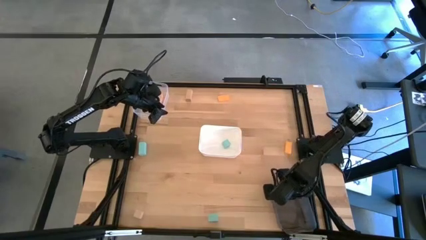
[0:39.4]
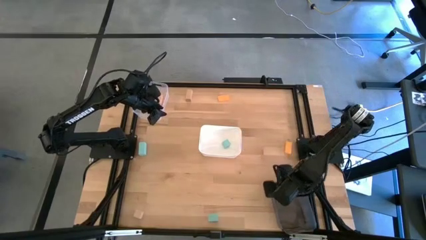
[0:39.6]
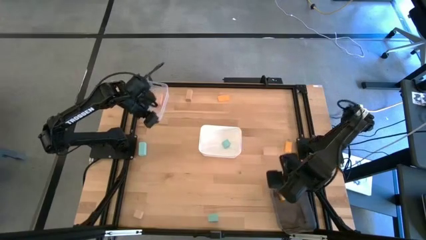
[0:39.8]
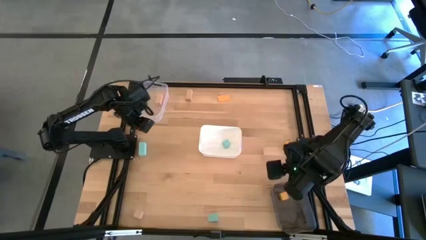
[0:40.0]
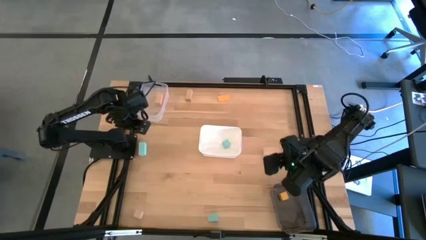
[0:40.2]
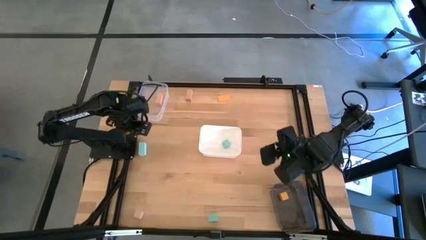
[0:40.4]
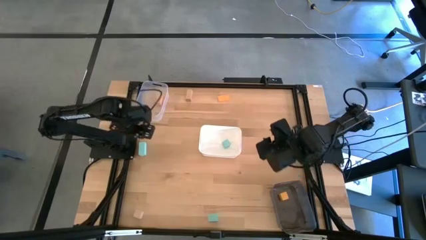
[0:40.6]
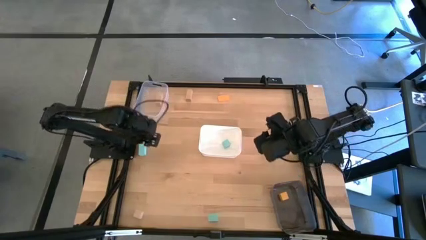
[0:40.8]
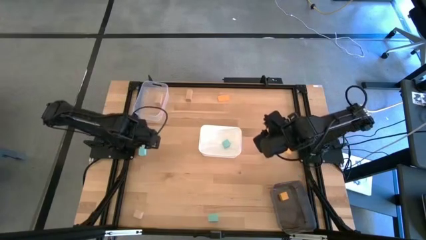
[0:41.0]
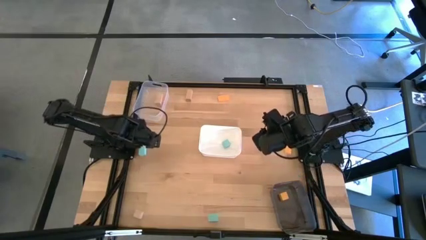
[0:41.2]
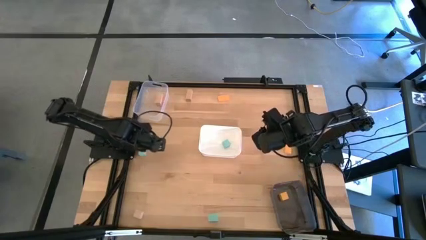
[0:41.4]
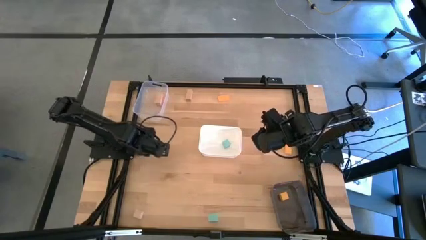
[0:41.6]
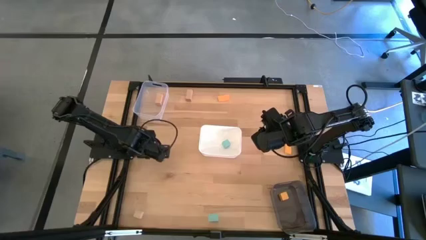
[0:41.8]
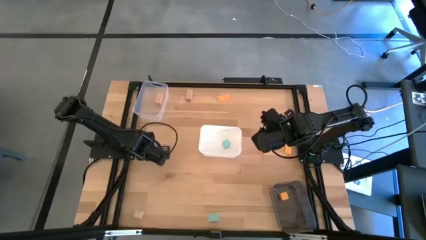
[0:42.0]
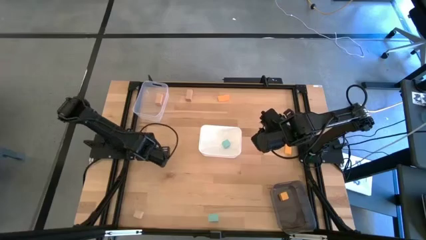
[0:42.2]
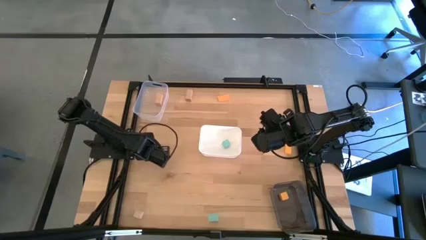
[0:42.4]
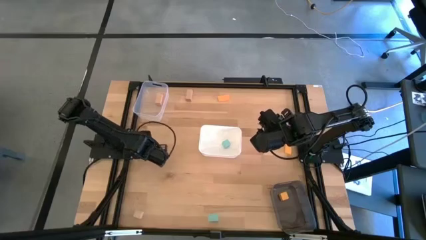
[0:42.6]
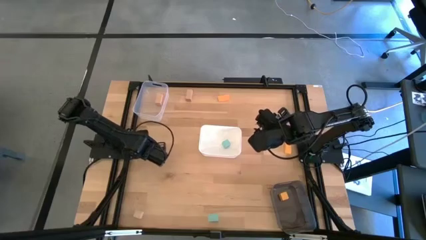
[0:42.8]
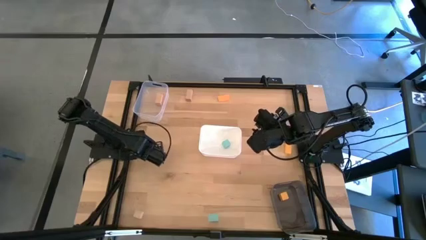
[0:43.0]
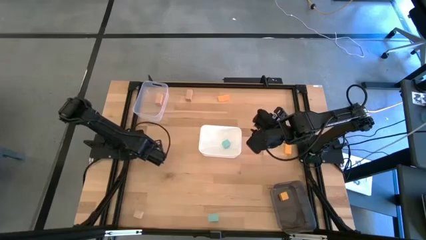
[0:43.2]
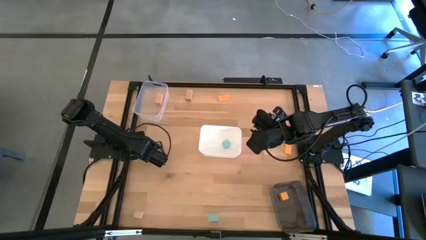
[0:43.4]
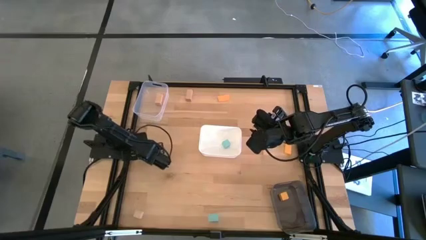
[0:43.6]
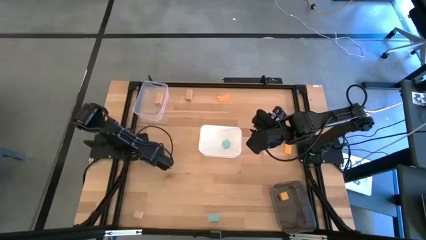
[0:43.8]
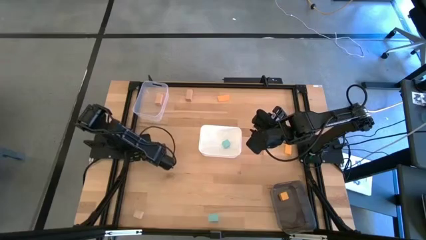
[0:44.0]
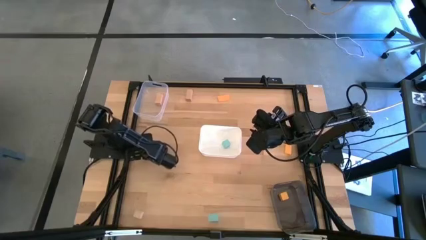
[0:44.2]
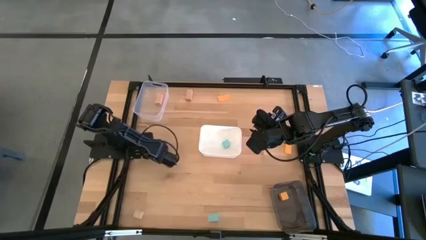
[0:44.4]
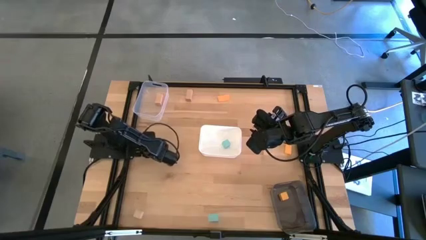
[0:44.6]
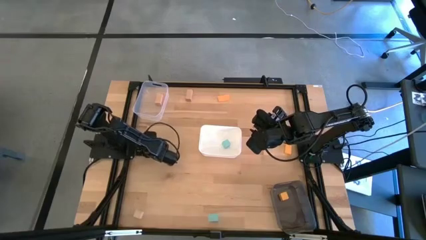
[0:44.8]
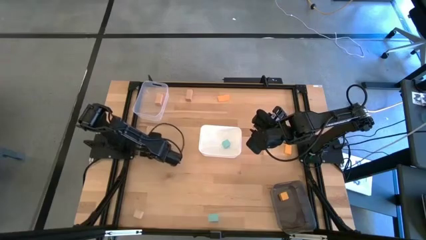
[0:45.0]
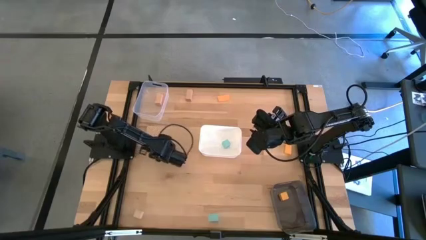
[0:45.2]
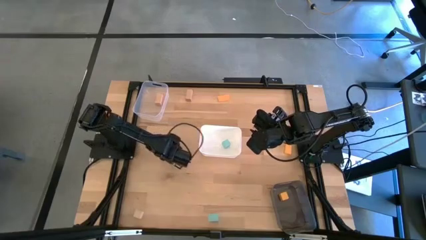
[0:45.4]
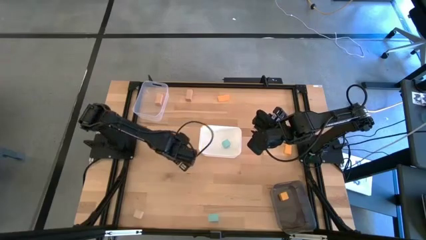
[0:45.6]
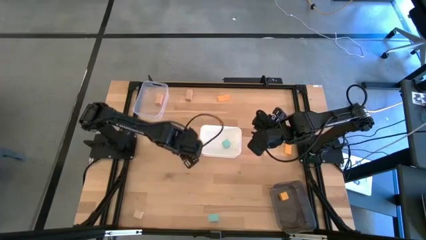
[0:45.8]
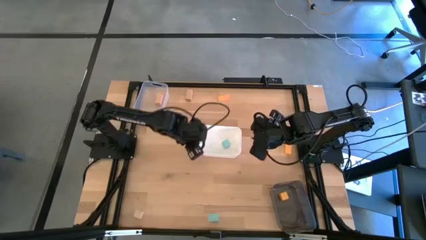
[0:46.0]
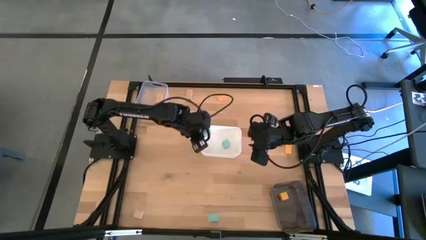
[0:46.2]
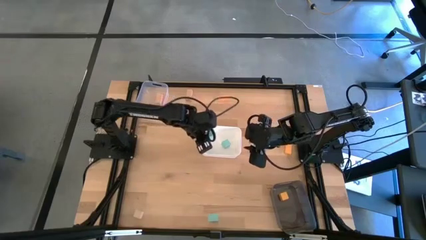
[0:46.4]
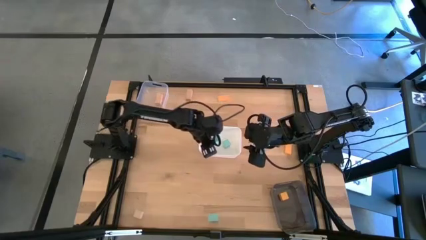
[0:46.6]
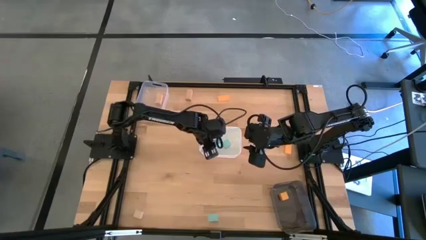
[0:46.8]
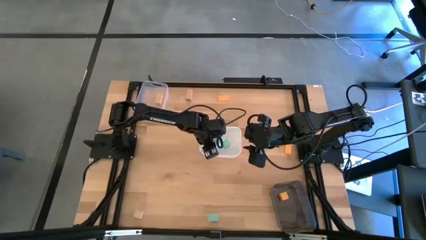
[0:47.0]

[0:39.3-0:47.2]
Task: Sort & place blocks by color
Put the top light blue block into the white bin

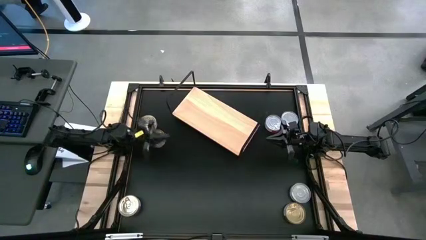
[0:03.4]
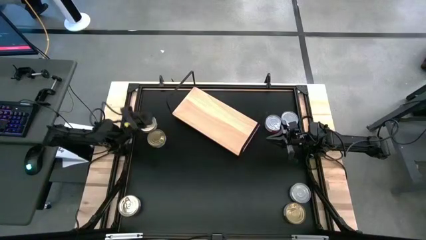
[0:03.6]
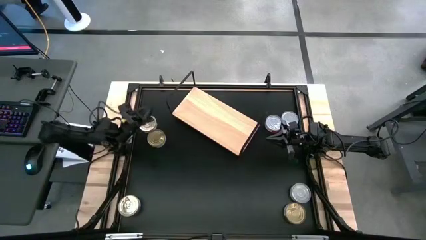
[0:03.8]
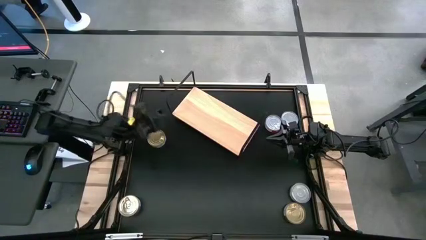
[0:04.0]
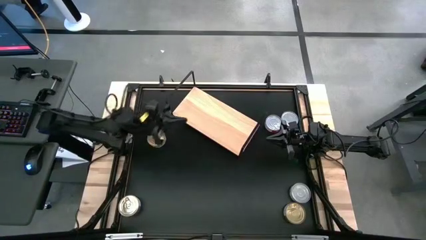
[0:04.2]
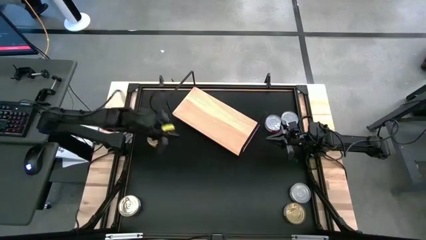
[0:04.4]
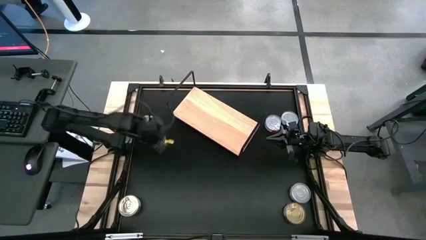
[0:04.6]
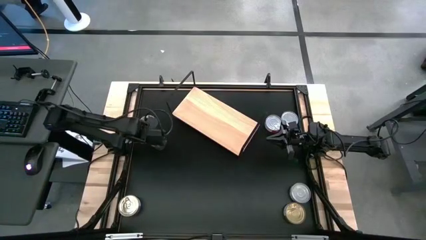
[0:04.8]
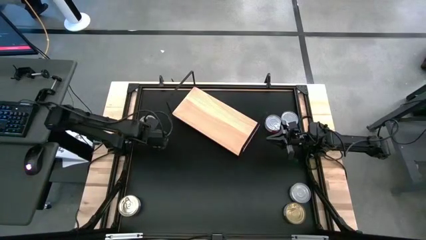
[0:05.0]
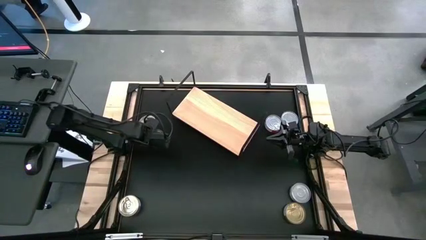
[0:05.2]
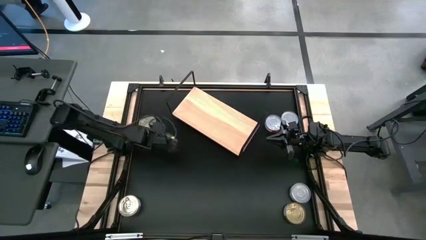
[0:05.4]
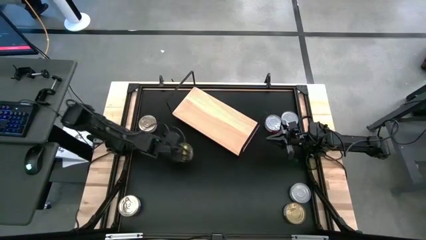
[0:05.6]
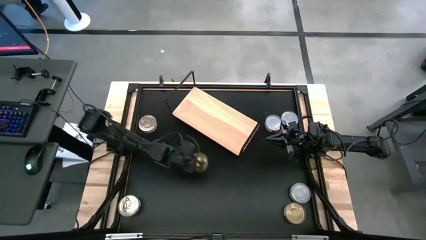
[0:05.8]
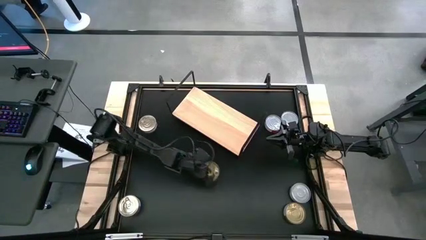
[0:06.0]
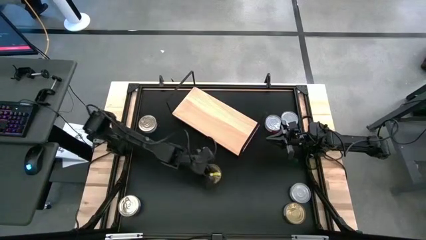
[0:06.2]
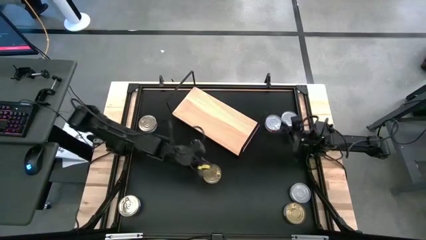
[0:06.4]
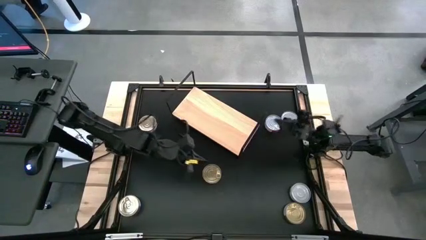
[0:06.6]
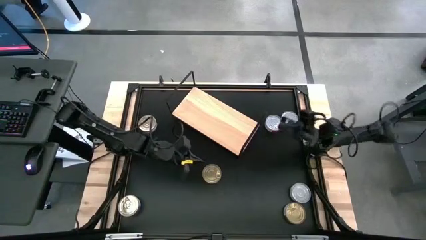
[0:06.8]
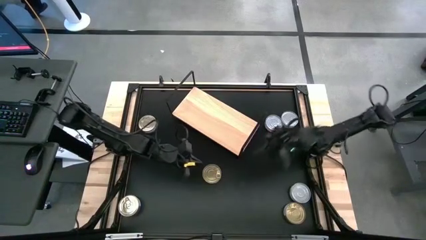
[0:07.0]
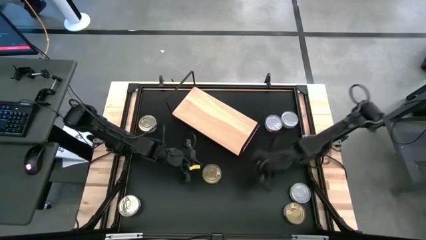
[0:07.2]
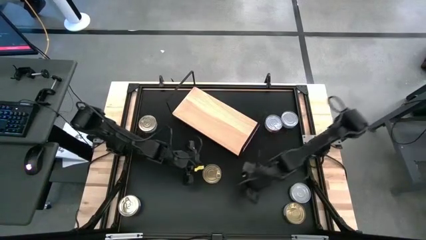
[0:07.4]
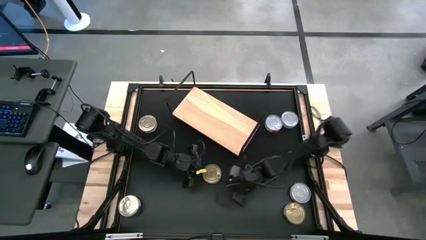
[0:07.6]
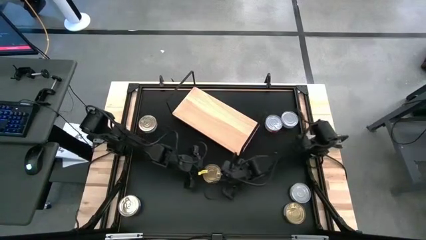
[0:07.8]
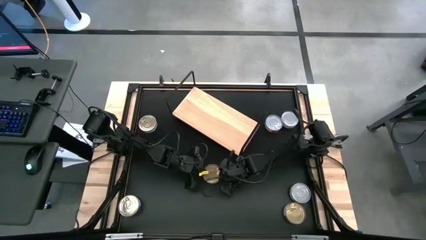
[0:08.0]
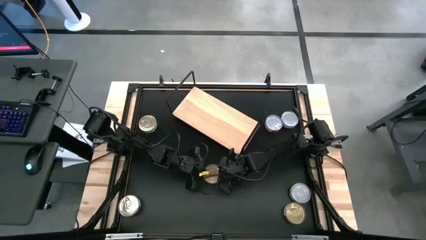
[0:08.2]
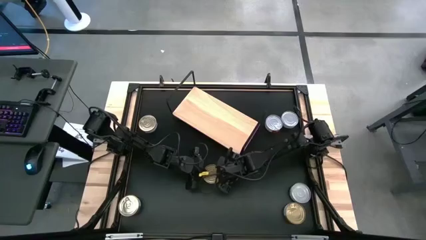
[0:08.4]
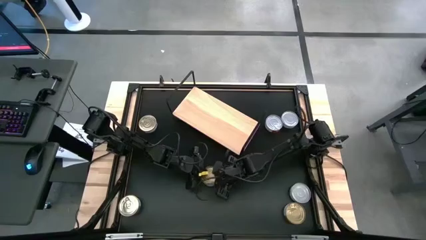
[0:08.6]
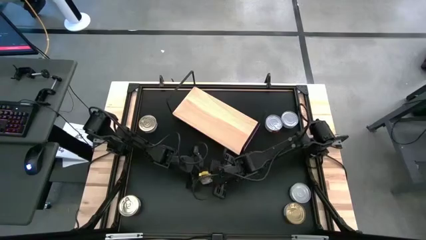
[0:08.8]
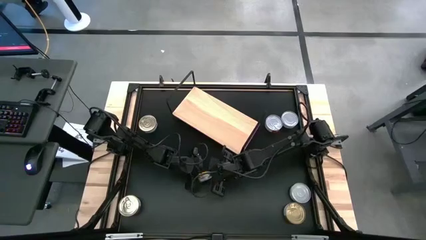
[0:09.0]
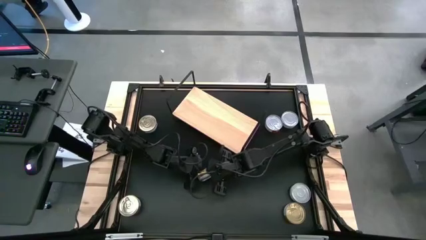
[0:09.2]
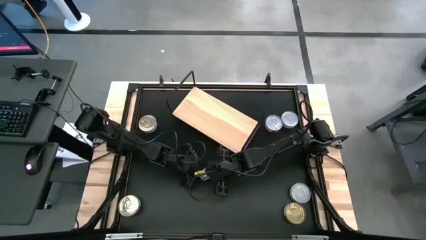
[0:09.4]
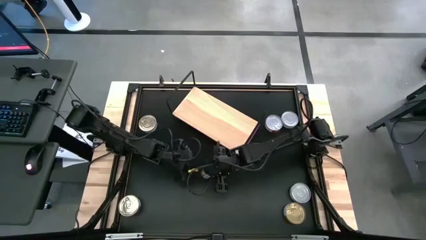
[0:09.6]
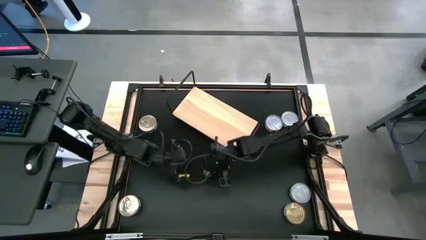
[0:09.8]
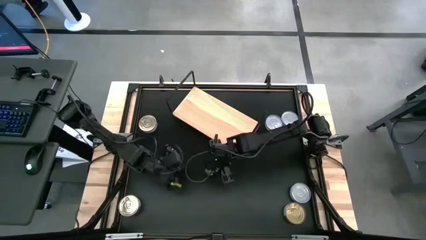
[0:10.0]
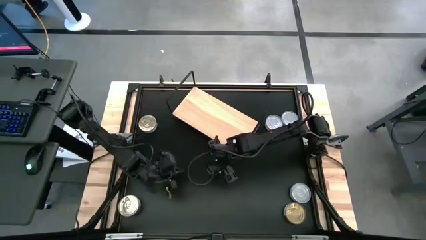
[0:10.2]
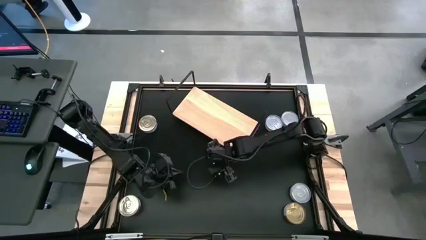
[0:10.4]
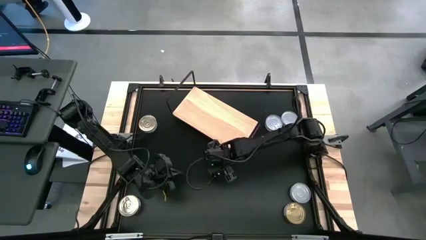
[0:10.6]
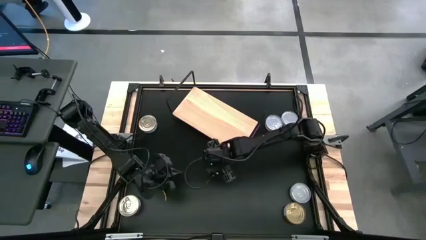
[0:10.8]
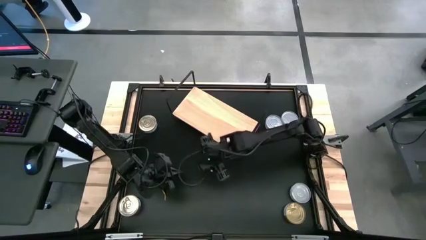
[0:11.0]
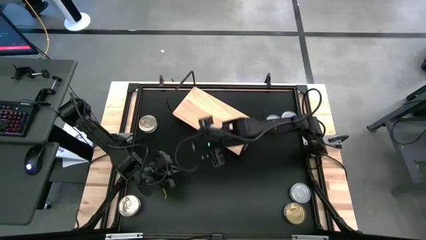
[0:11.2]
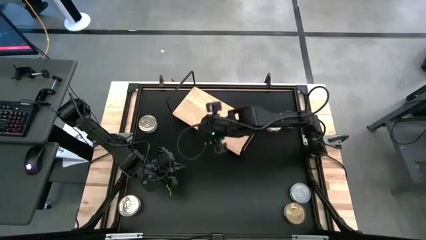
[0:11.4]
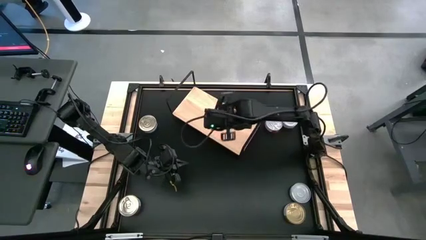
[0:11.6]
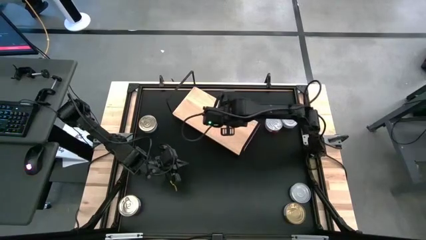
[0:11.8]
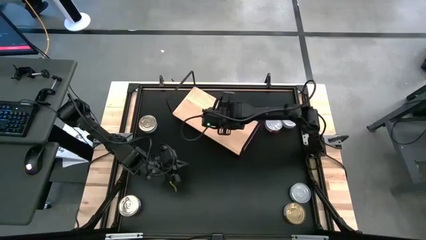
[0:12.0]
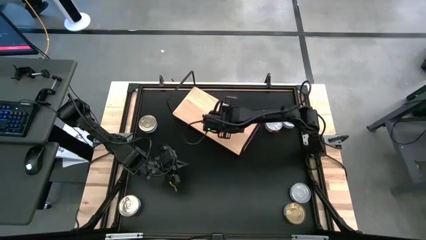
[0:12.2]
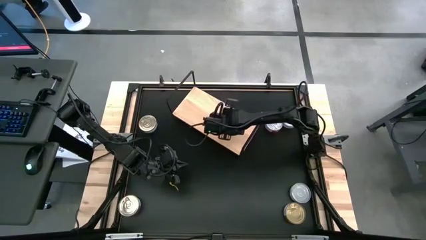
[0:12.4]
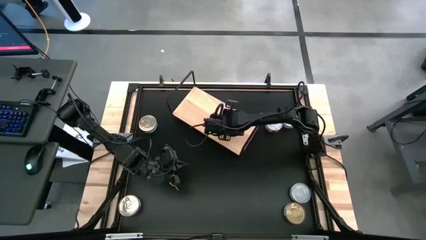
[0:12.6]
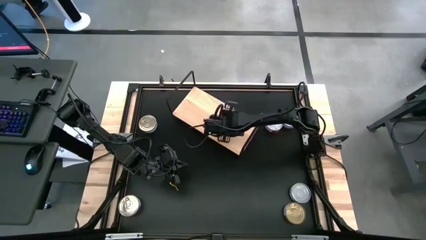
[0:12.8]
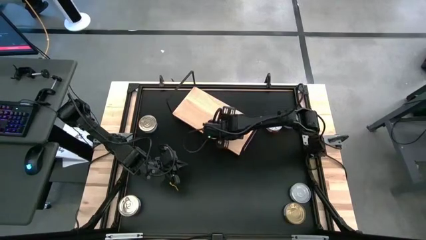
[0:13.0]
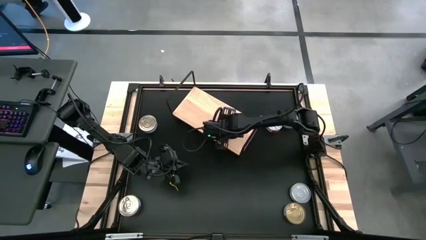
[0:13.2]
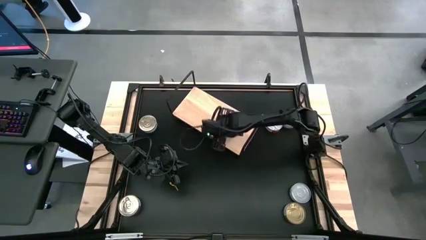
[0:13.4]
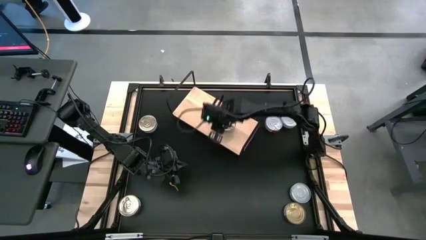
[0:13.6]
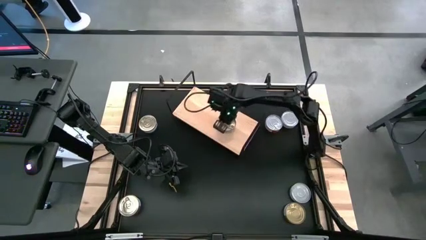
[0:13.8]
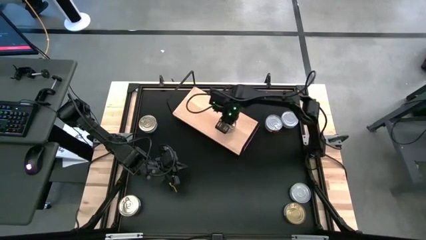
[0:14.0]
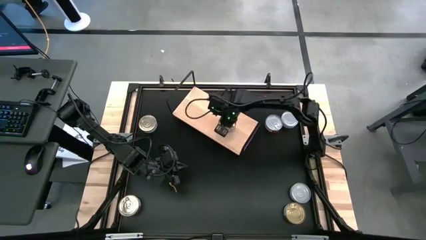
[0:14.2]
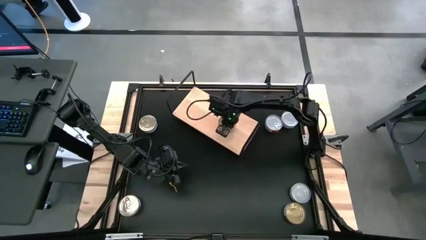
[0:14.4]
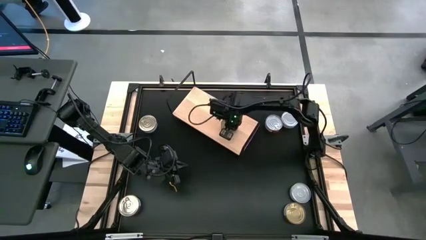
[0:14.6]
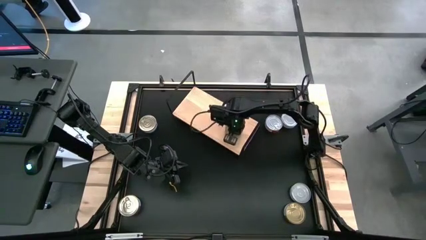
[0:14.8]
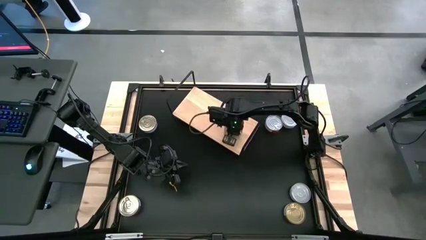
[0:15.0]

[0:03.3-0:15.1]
Task: Stack canned seafood by type on shelf
Put the top green tuna can on the shelf
